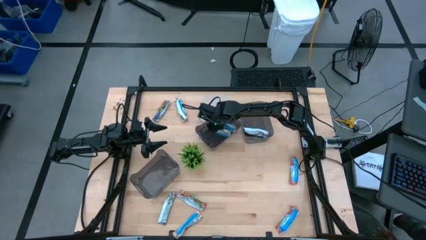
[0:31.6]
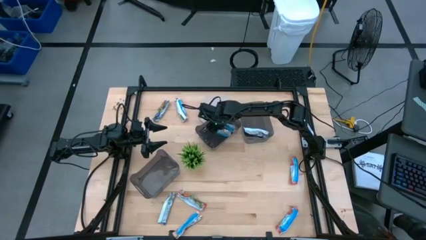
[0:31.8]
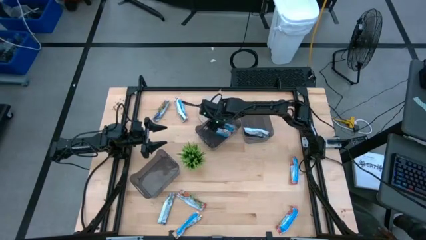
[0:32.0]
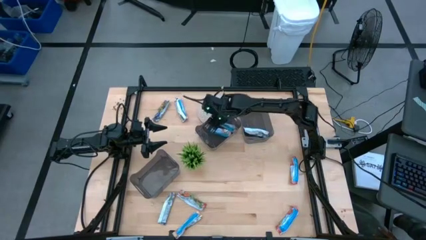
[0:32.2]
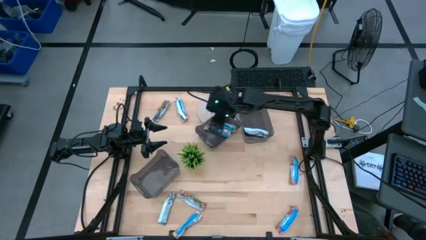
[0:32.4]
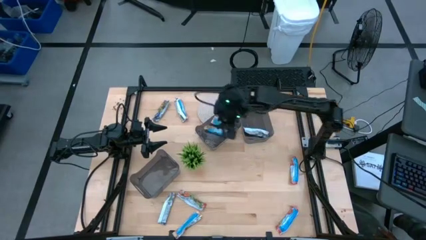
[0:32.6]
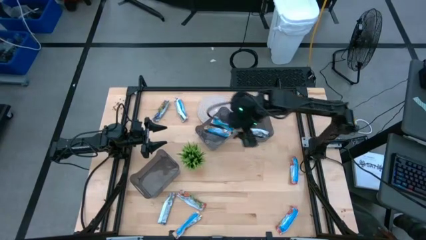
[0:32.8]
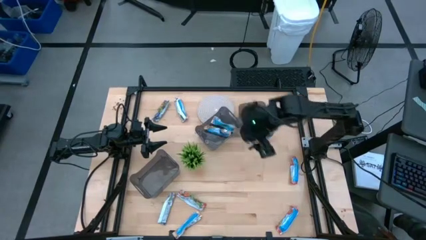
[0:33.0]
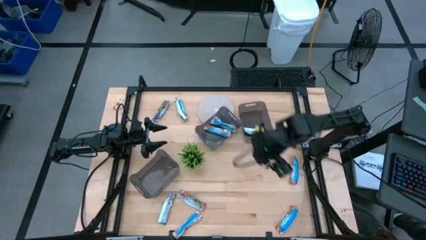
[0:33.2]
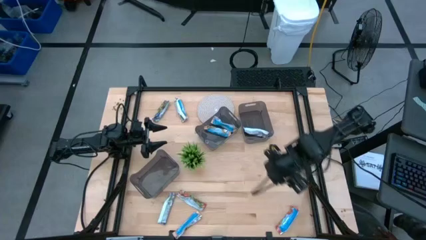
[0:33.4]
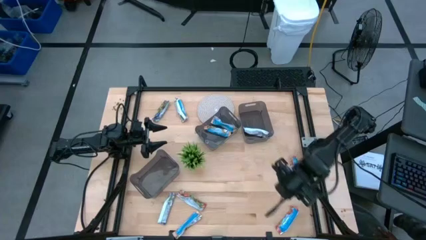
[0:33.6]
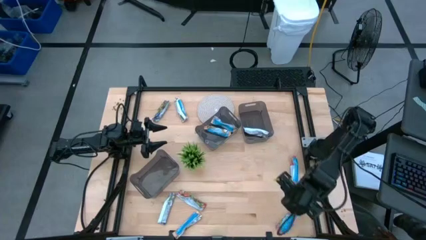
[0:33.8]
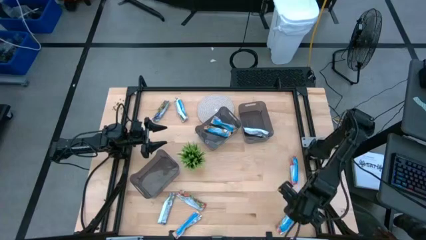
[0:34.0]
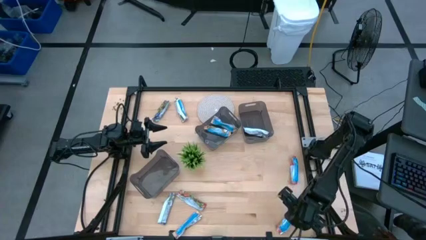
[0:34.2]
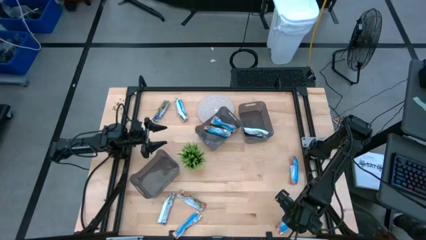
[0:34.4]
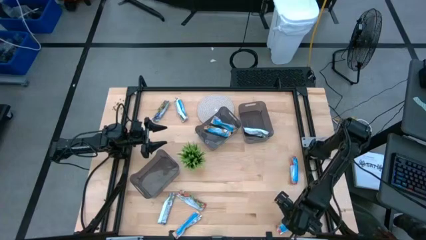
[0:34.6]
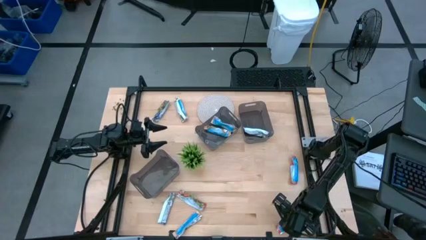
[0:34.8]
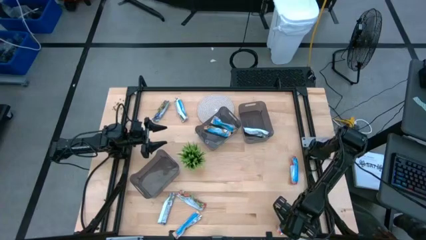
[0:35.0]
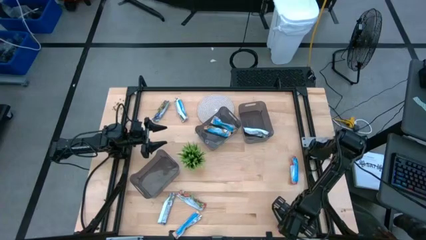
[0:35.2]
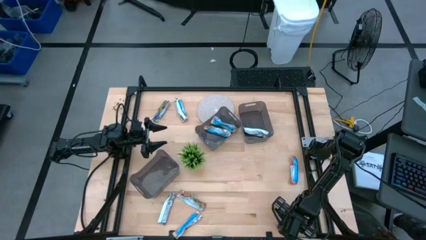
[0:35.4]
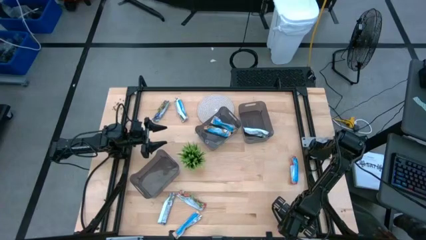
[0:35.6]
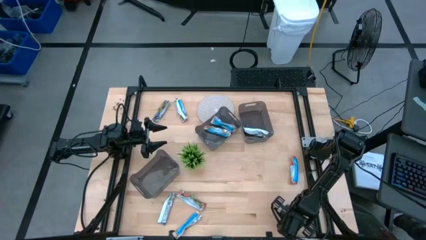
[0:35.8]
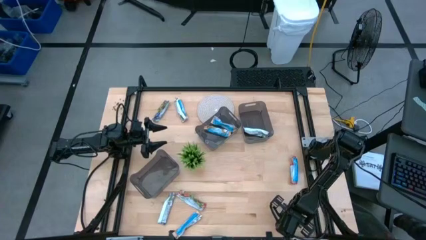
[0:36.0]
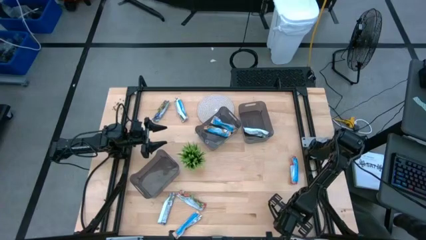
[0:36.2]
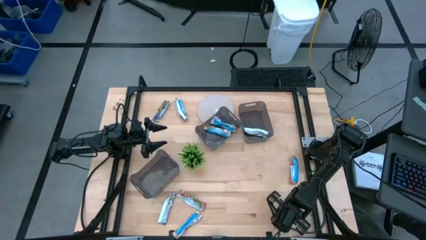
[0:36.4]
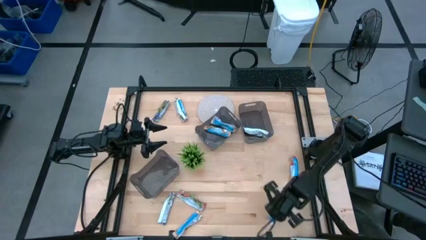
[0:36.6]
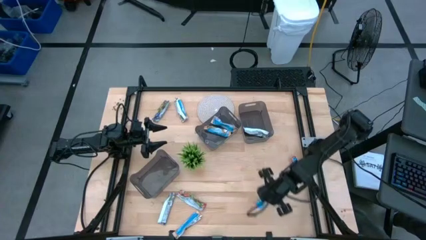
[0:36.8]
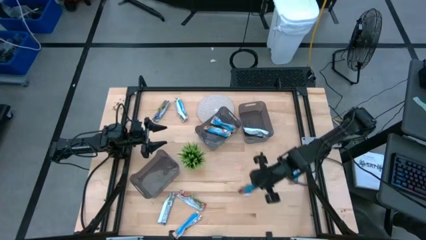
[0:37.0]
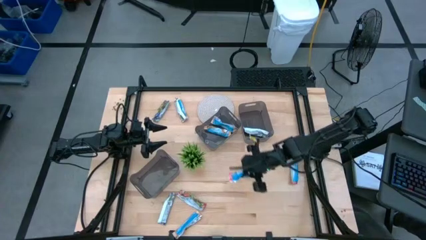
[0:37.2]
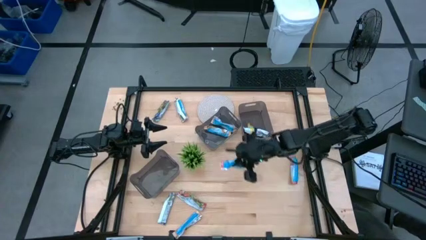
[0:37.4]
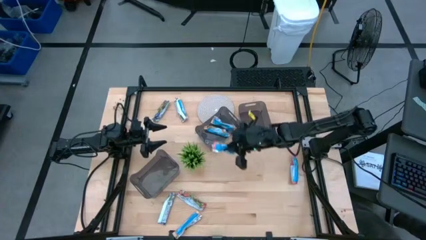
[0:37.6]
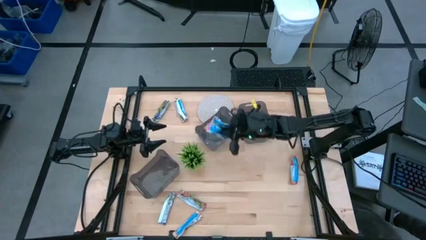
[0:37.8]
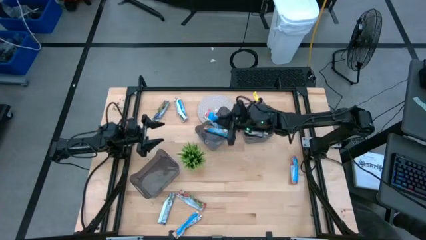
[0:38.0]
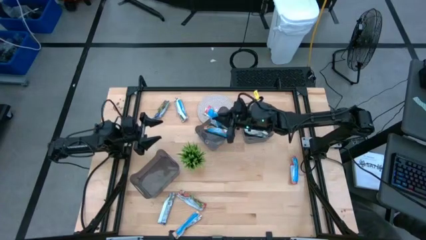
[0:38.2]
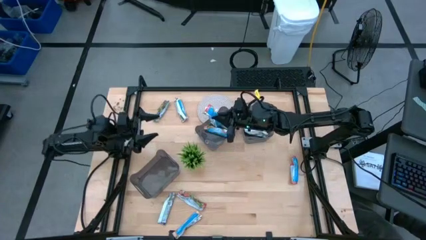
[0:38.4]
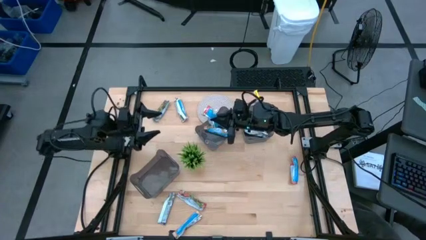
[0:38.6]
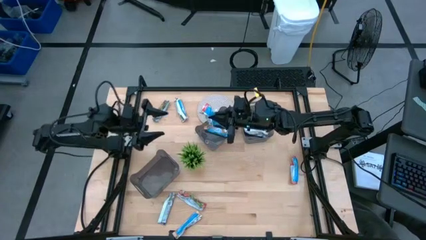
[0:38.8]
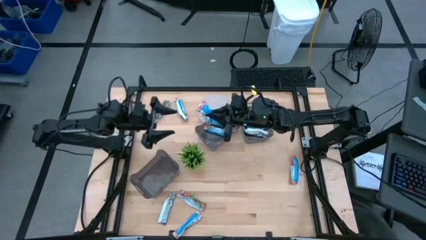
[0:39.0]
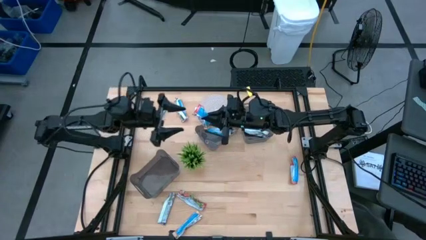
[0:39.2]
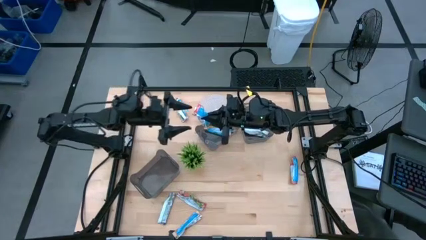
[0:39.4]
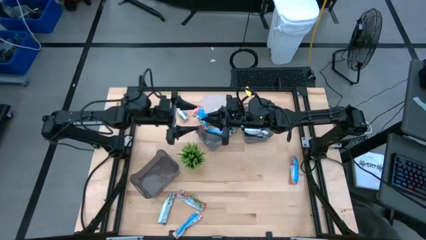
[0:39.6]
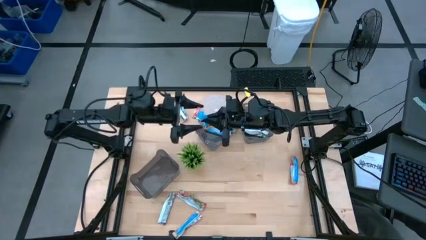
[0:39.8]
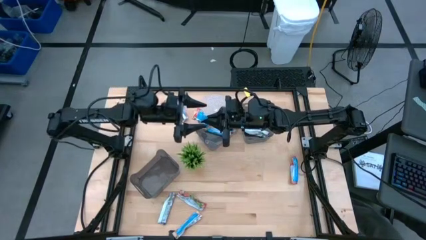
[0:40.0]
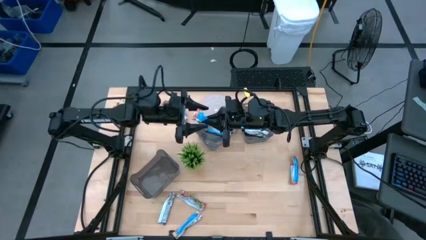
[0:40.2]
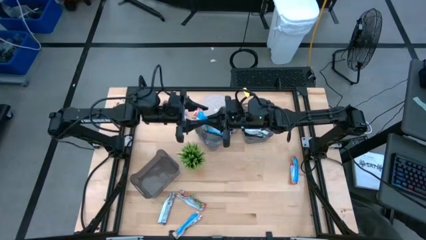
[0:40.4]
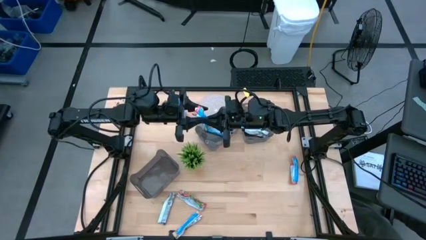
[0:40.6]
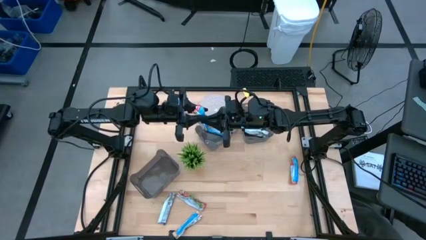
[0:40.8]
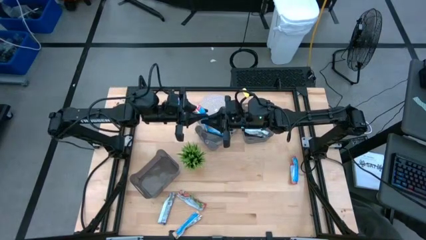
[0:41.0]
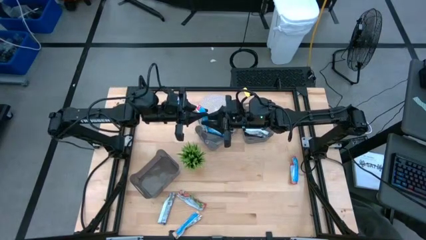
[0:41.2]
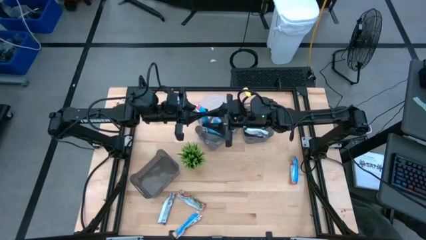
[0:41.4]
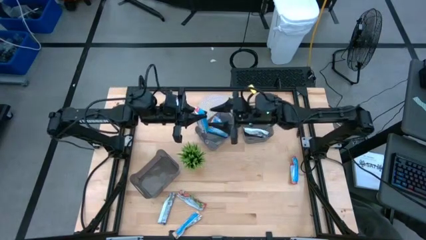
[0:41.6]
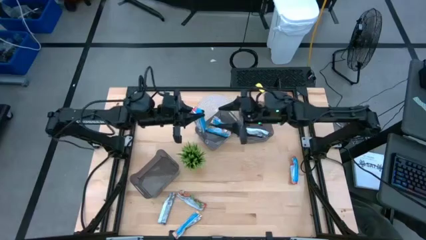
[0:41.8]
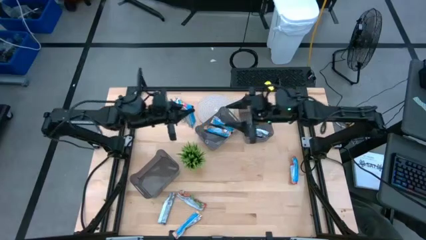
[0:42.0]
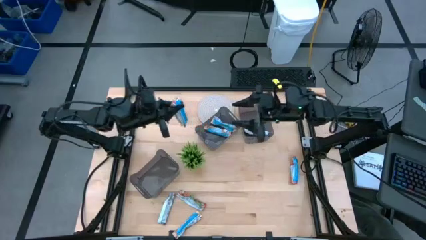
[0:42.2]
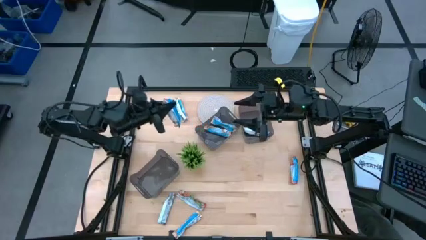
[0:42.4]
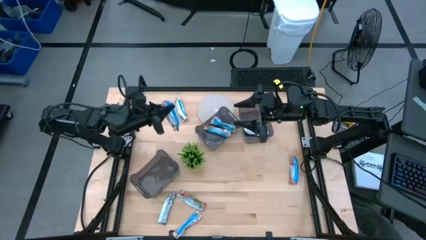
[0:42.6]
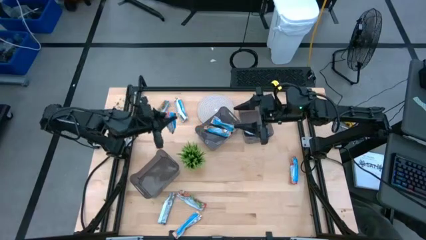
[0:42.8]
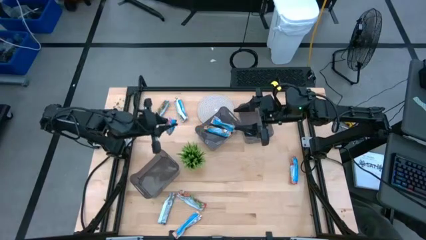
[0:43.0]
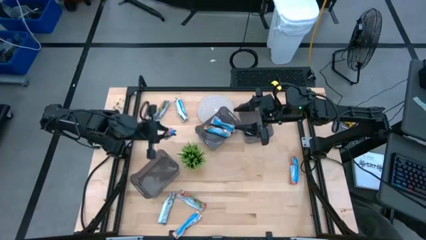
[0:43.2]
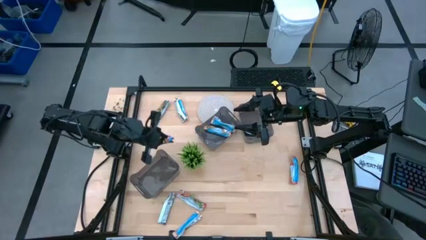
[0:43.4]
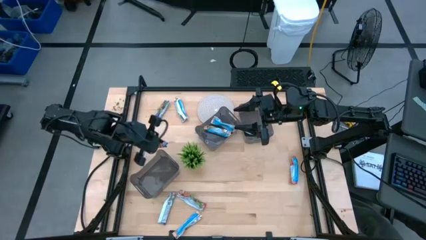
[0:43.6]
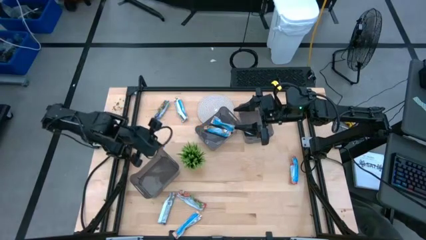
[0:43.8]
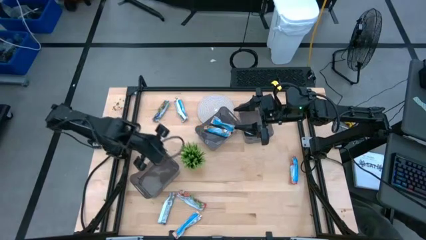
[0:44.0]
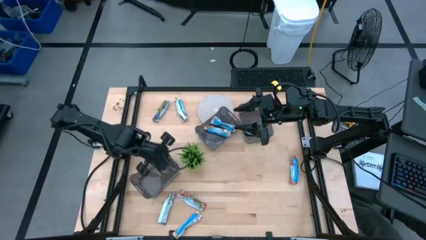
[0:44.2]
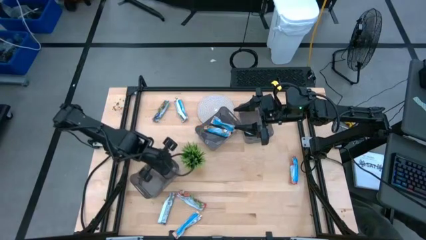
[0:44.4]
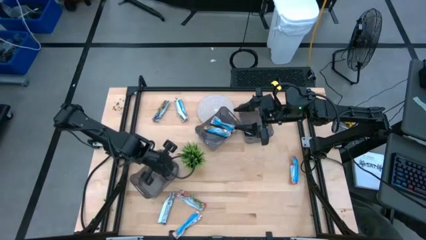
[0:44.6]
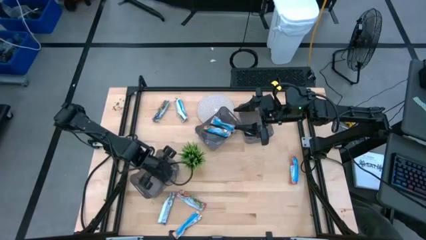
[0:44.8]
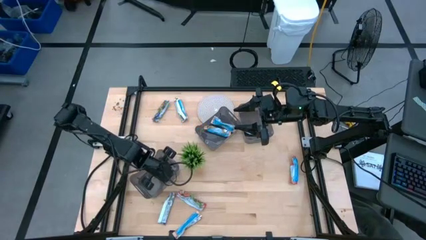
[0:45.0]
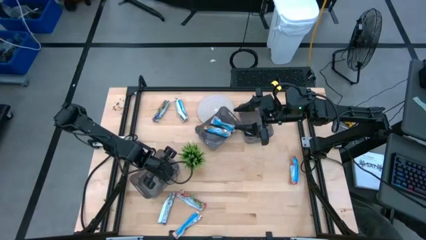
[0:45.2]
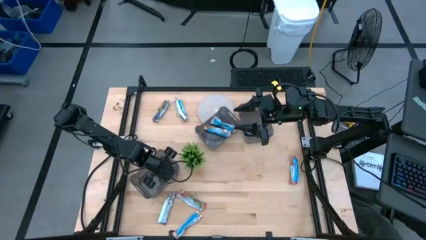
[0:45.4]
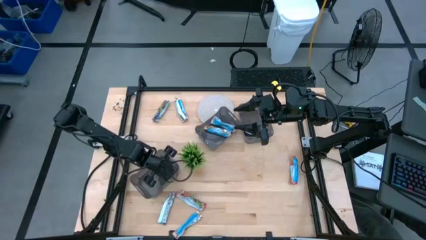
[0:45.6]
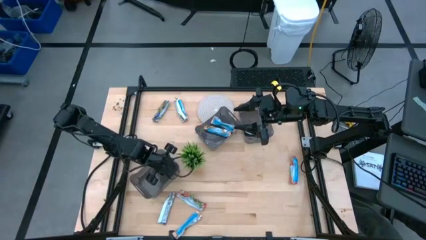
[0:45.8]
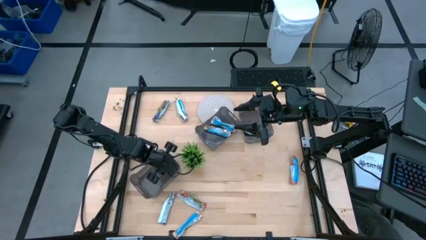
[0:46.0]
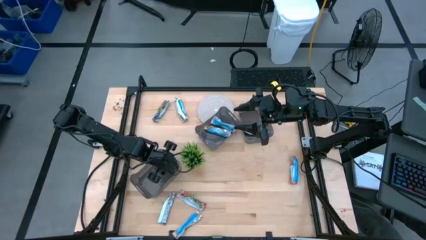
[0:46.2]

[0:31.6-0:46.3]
Task: Pick and place Granola Bars by type
Put the red granola bar into the bottom black bin

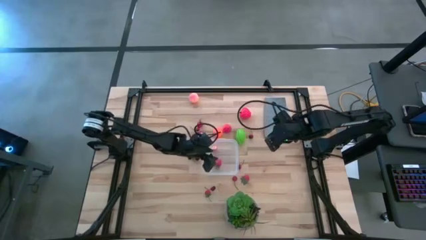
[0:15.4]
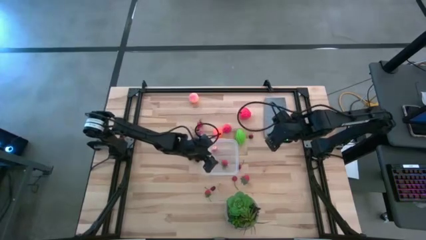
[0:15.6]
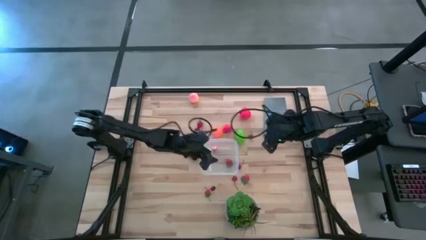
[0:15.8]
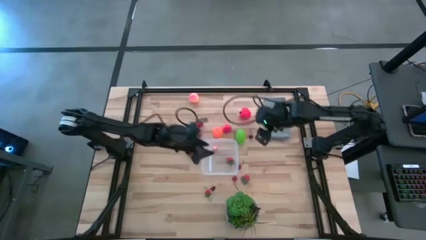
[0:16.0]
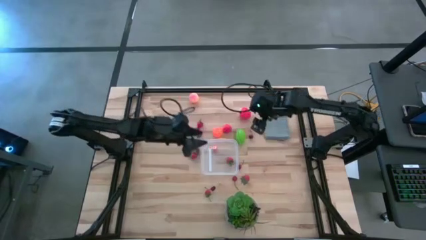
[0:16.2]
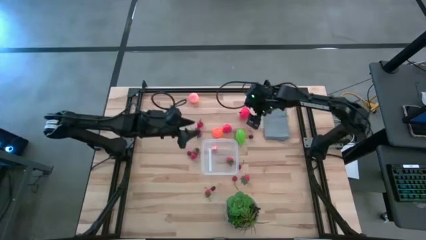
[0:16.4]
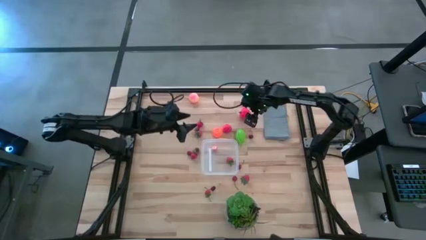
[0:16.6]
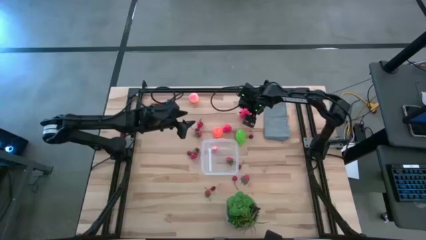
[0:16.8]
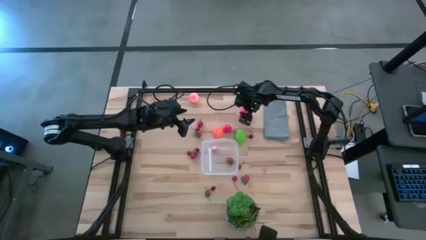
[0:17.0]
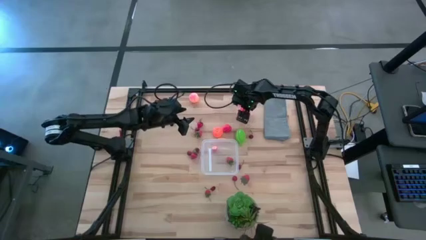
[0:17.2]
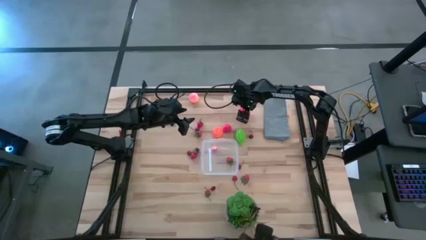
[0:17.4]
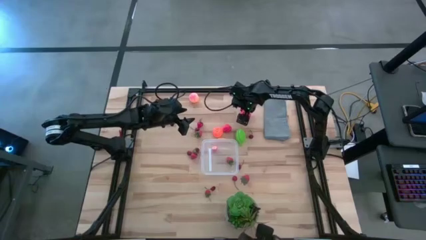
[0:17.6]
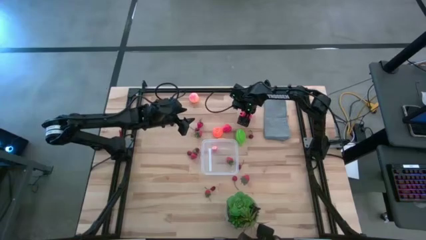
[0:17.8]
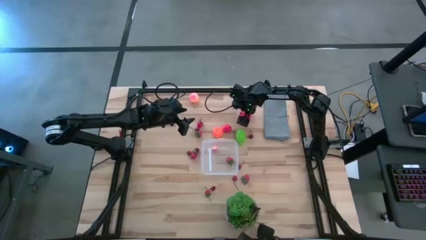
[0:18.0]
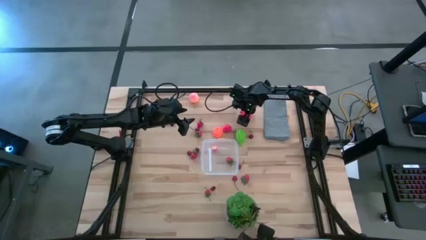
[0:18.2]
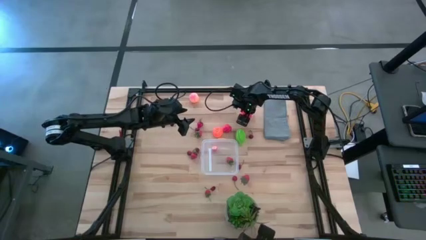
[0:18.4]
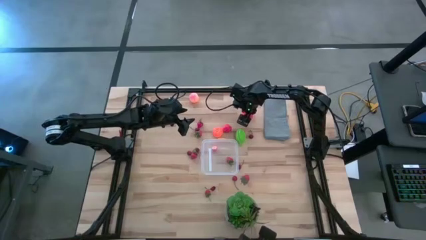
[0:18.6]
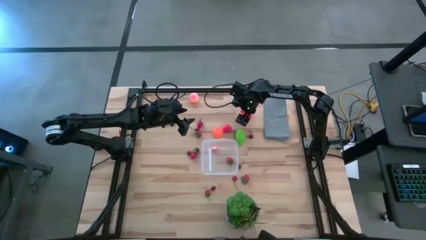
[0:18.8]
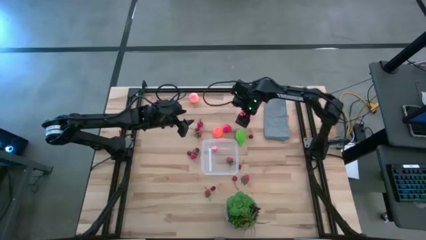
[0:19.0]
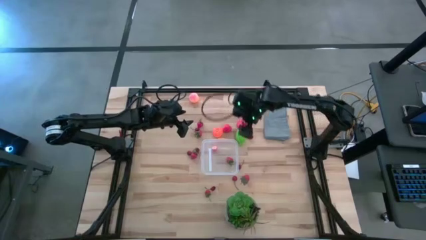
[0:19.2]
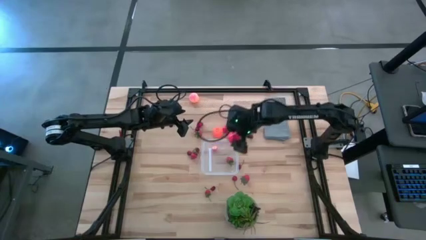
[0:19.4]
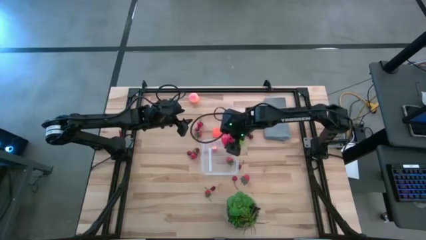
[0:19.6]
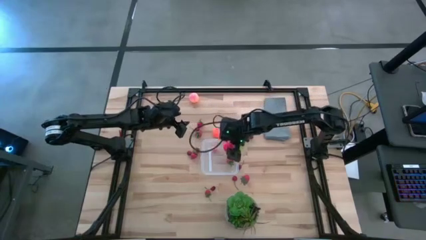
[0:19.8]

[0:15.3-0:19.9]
Task: Pick and placing Produce into tupperware
Put the red apple into the transparent container
